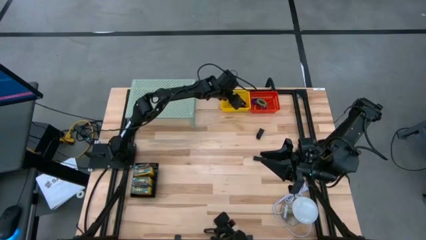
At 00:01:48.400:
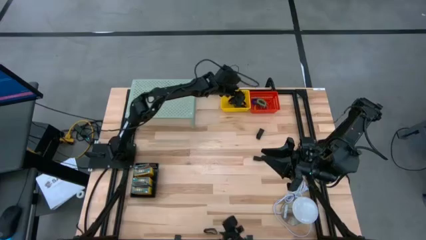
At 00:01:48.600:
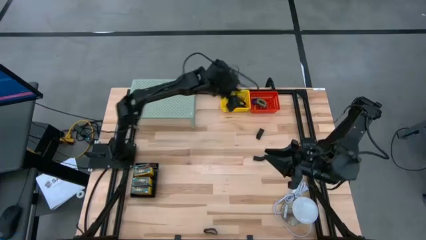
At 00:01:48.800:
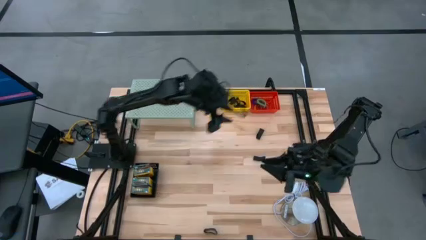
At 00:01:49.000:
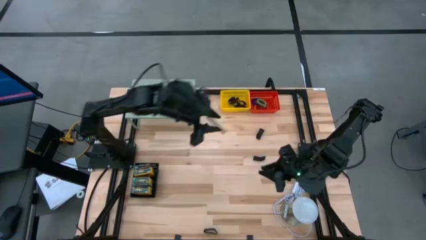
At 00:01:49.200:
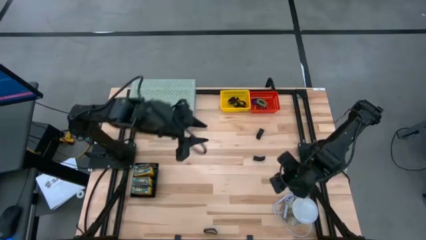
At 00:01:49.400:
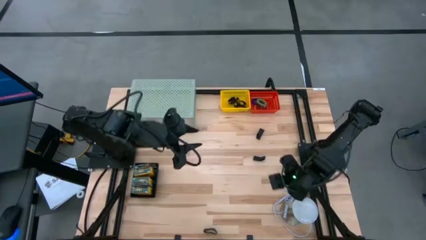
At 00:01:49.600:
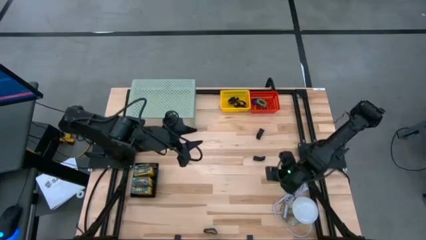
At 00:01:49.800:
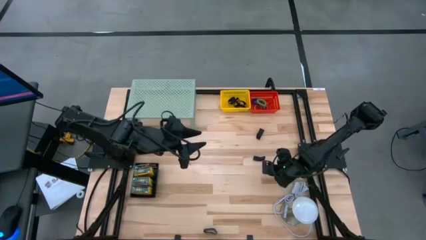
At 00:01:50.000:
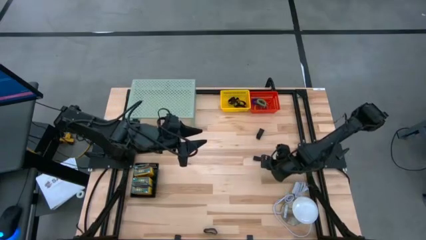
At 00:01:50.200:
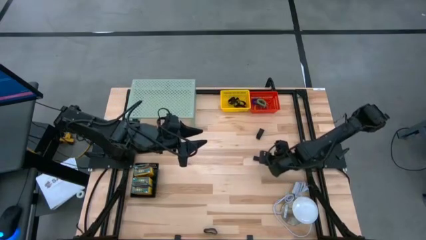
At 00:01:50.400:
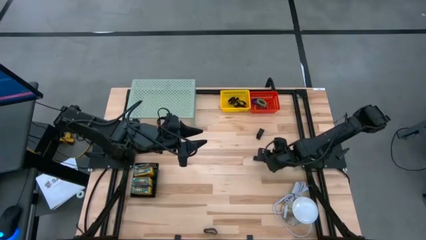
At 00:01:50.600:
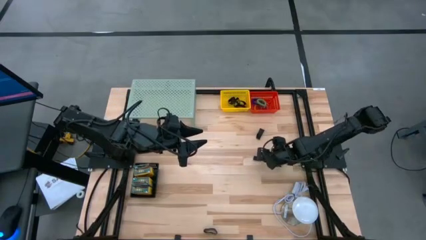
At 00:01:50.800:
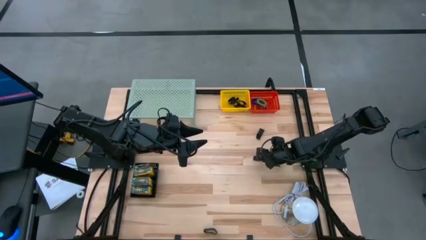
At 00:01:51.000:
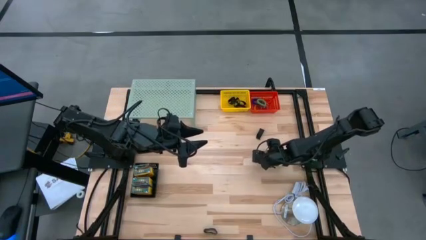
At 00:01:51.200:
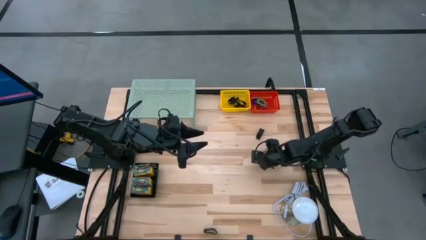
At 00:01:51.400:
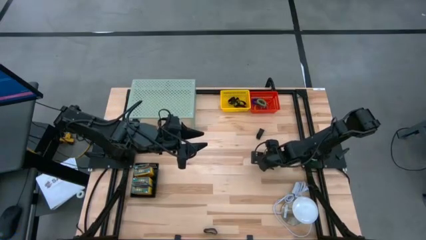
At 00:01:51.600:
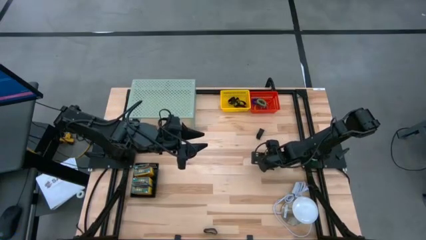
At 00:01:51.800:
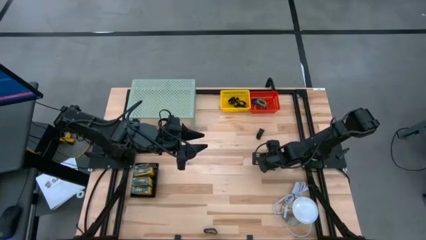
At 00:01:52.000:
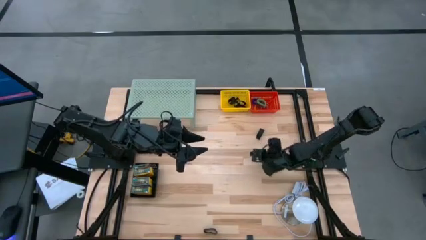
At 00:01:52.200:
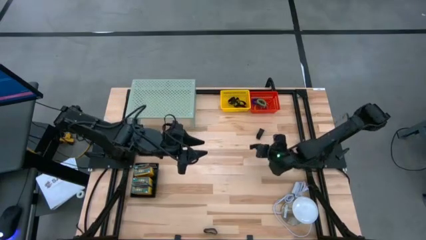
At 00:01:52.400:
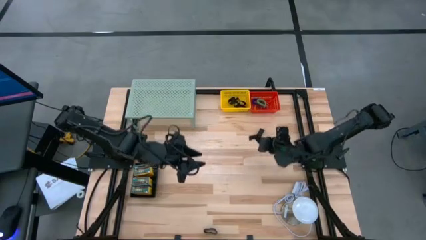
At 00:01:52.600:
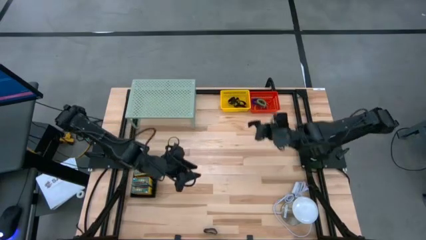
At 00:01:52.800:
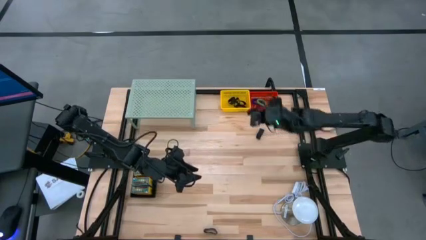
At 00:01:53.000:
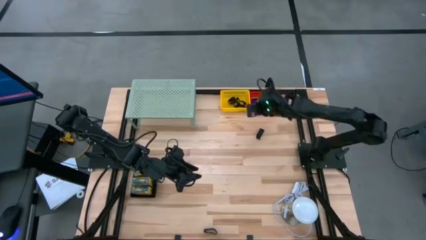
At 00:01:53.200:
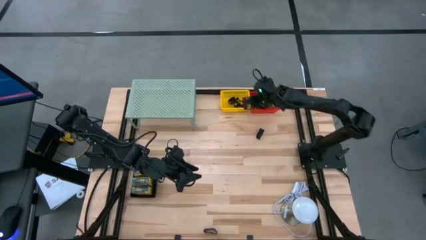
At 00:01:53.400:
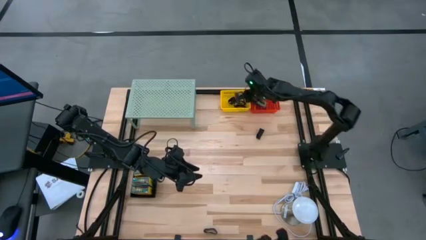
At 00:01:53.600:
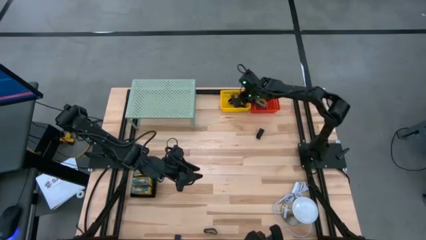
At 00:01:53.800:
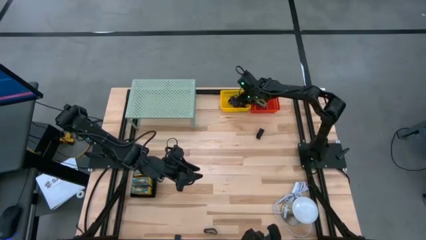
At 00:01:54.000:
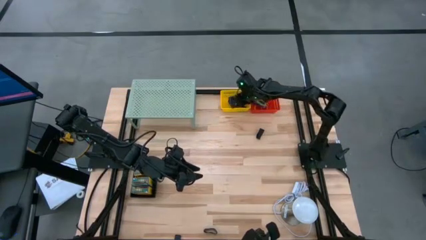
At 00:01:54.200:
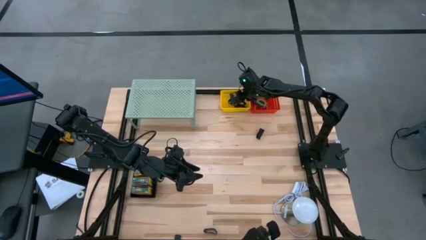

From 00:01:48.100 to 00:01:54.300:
Task: Pick & Place Office Desk Supplies
Put the black rubber band into the yellow basket

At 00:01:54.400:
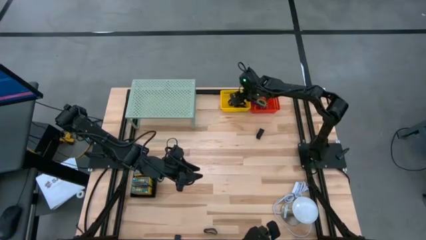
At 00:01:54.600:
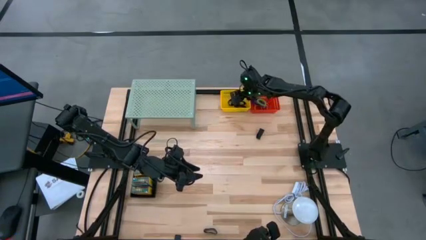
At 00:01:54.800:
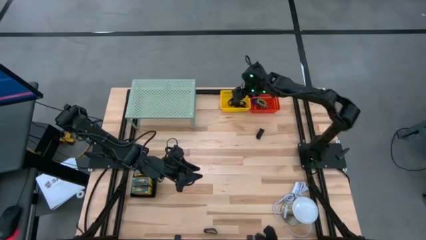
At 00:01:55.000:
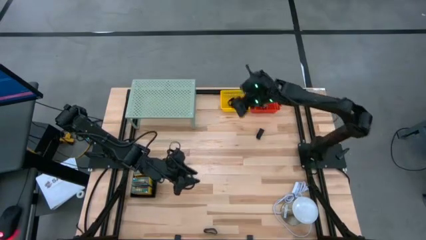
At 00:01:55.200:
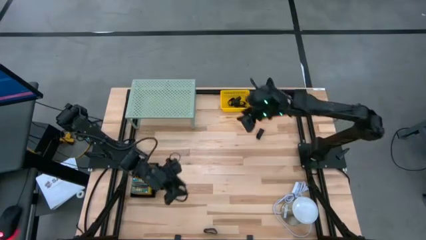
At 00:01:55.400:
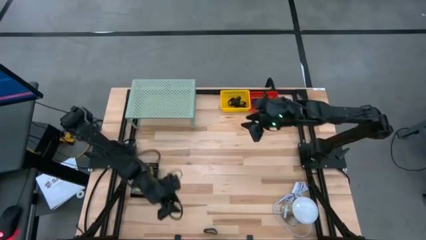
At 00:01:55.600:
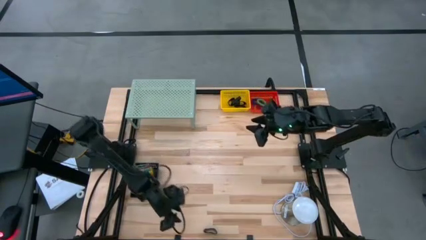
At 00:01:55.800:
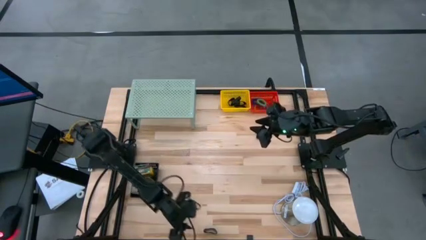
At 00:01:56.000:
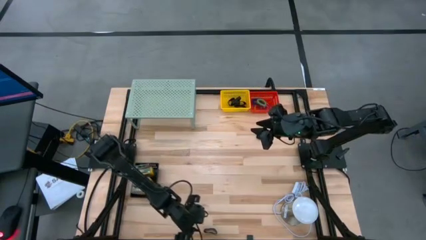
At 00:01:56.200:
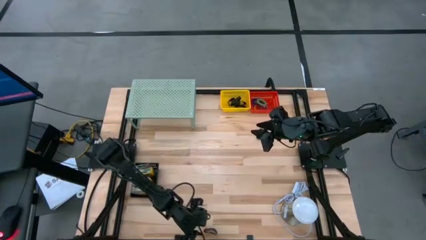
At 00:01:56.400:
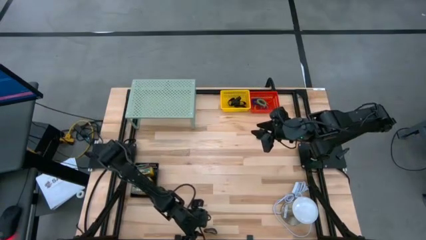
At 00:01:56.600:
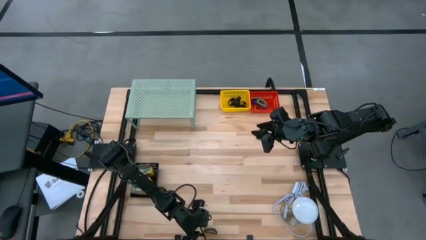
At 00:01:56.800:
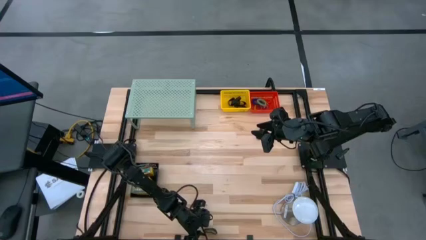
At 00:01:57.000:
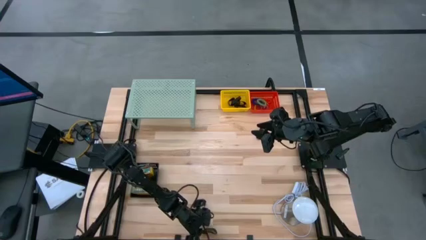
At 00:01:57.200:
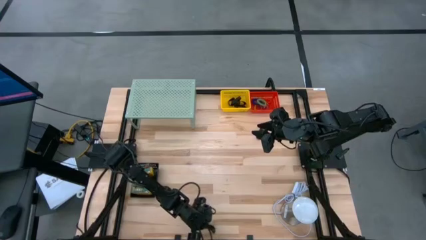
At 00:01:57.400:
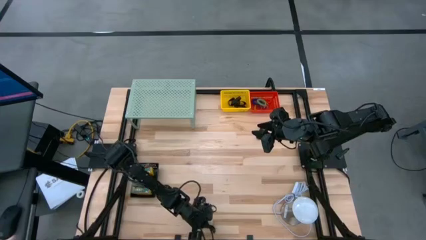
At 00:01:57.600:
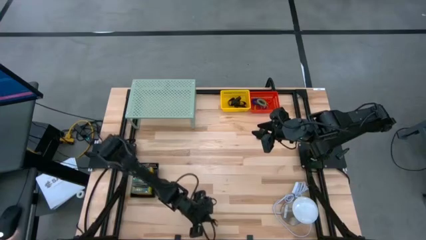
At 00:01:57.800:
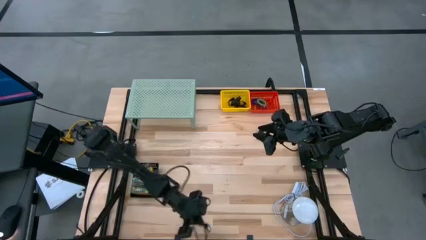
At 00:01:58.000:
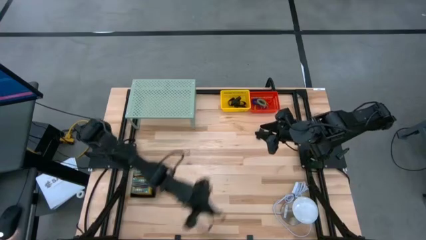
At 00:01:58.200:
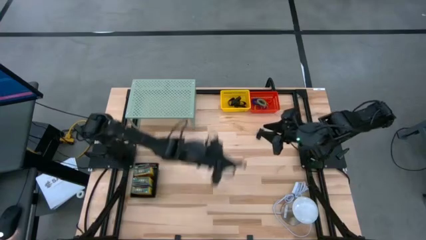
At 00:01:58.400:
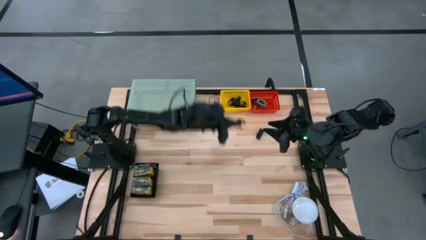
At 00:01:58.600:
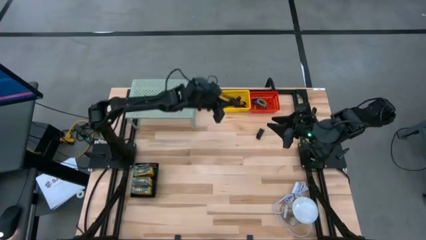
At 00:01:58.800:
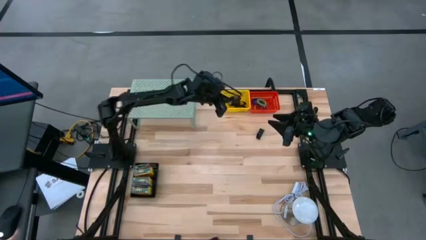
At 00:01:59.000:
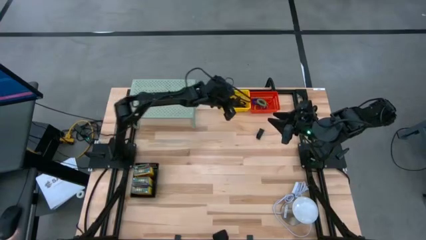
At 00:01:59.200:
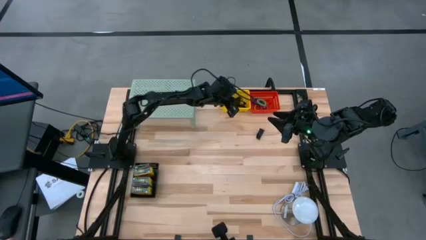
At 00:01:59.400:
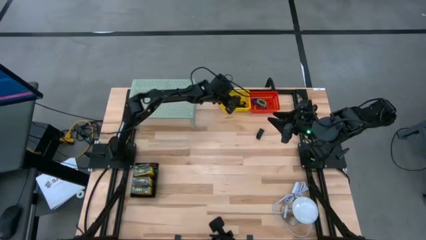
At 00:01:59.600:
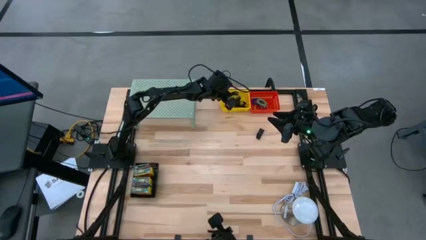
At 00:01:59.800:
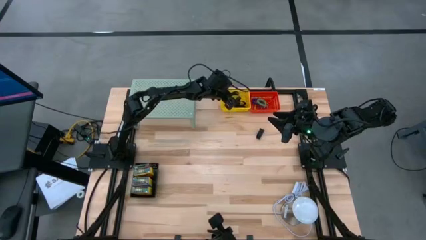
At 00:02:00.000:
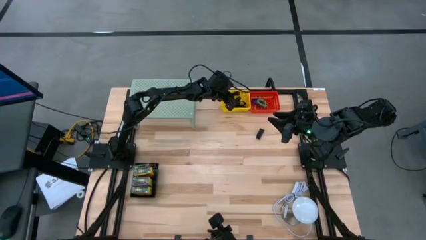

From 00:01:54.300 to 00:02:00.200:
Put the black rubber band into the yellow basket

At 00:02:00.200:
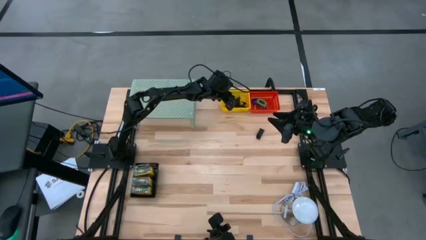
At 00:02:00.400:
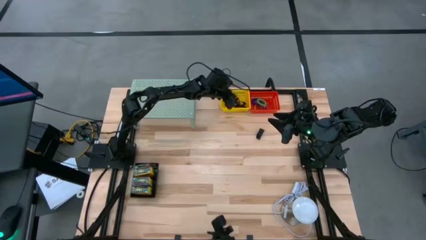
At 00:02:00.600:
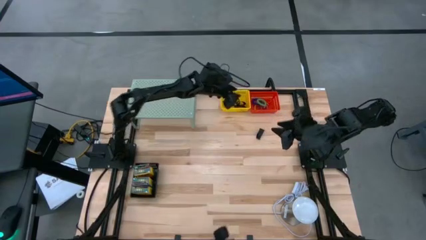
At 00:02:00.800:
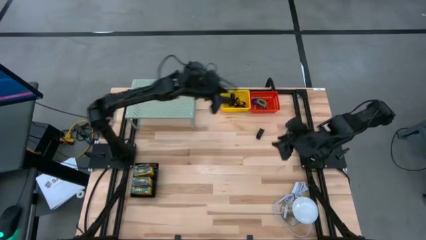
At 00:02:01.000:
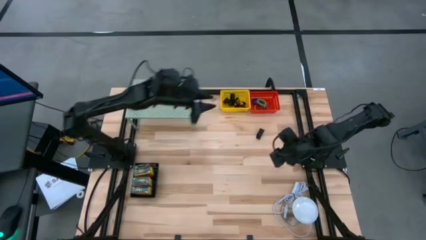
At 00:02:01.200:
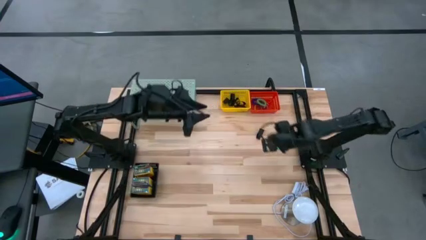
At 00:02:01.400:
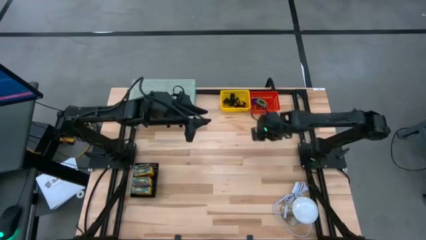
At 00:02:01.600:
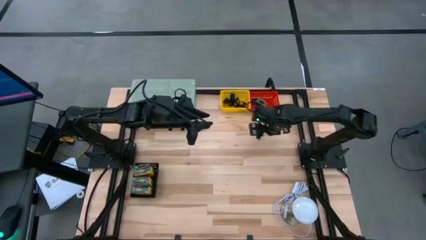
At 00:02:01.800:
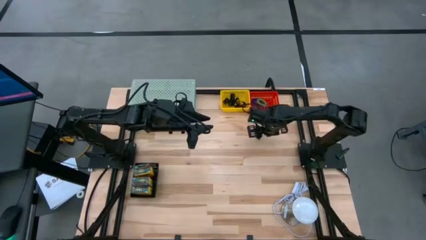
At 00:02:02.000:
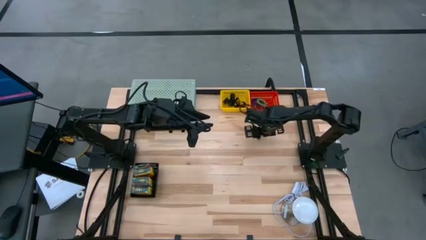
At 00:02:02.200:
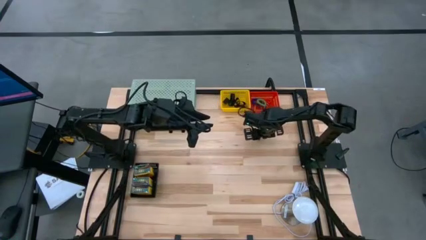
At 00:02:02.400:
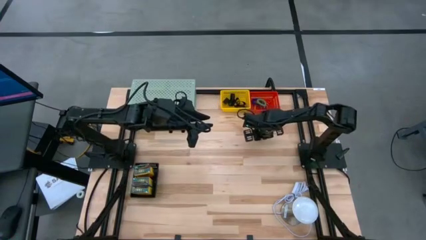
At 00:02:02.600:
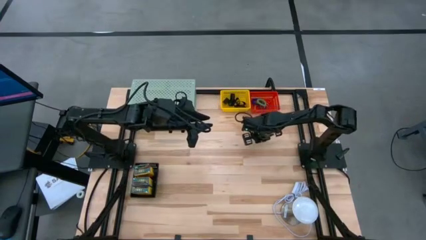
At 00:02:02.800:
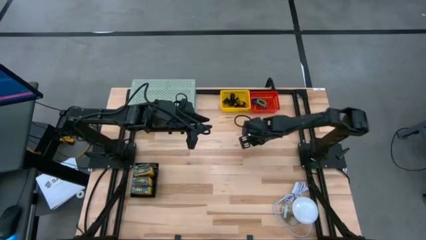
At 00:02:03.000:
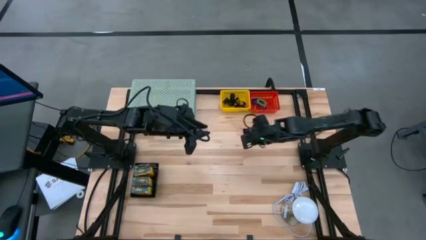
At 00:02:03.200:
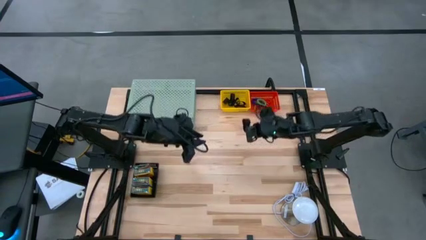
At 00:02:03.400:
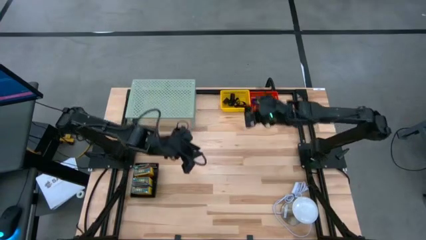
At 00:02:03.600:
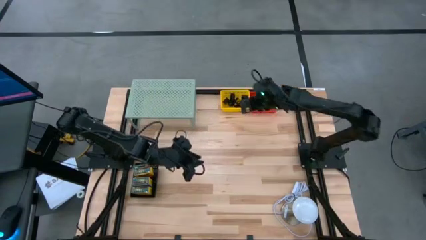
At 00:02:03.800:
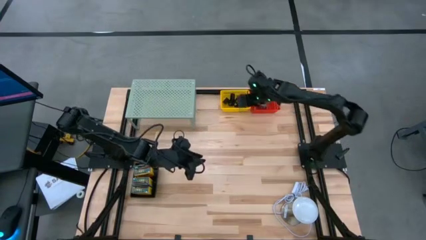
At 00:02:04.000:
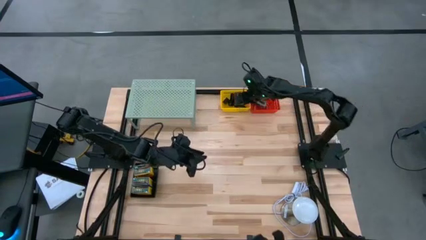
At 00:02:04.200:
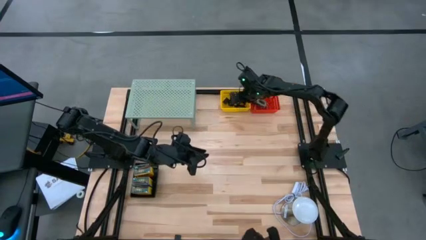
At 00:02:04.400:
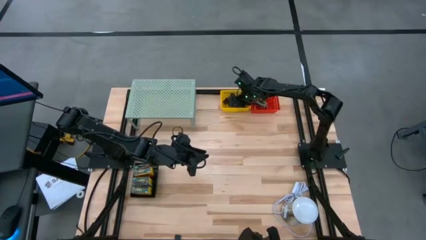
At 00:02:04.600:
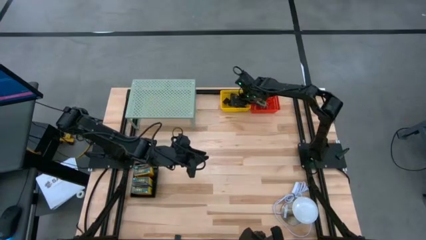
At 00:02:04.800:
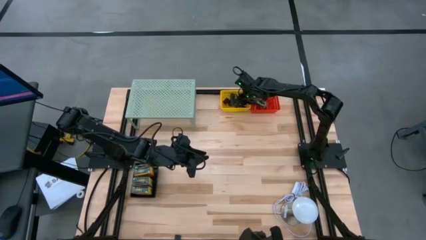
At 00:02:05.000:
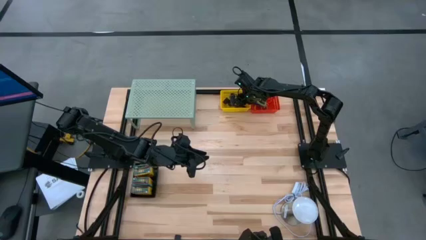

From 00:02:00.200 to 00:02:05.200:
Put the black rubber band into the yellow basket
